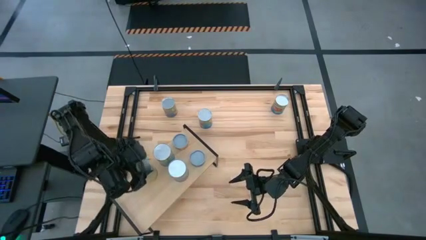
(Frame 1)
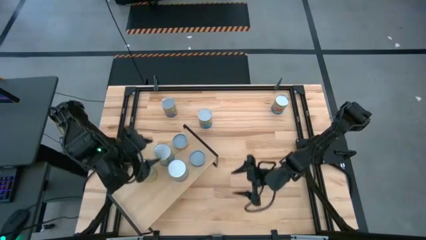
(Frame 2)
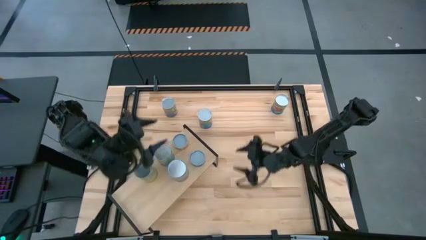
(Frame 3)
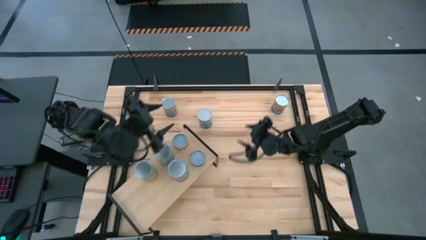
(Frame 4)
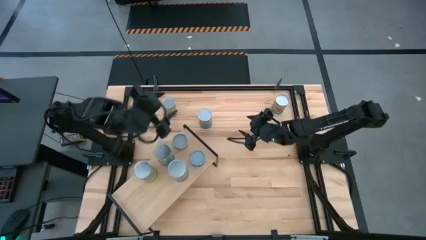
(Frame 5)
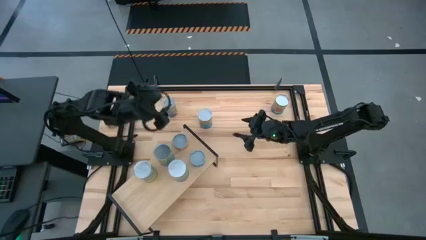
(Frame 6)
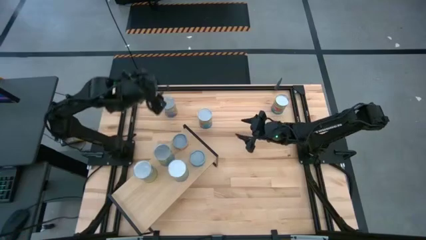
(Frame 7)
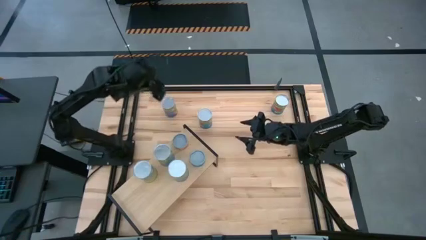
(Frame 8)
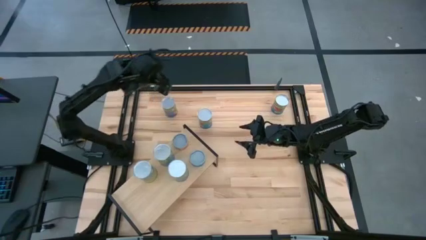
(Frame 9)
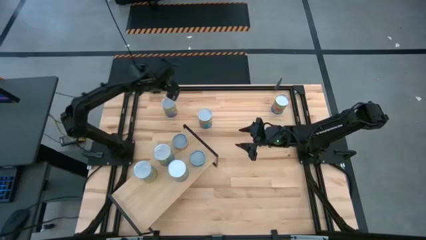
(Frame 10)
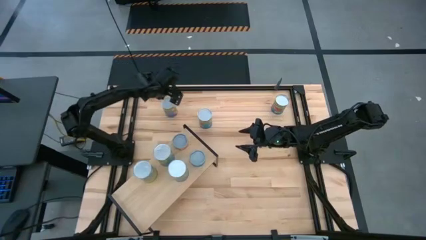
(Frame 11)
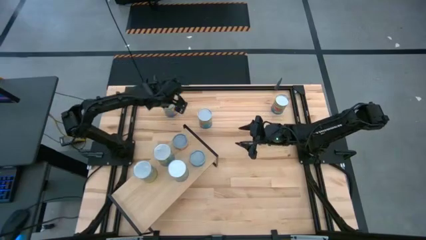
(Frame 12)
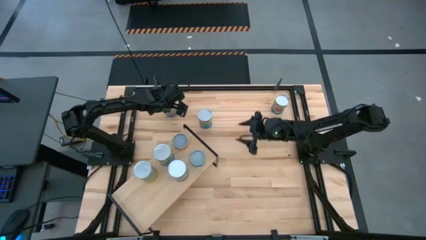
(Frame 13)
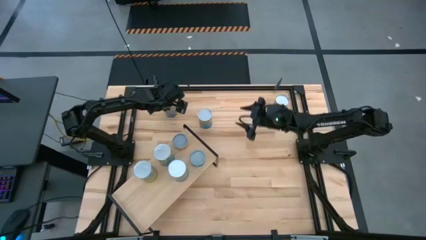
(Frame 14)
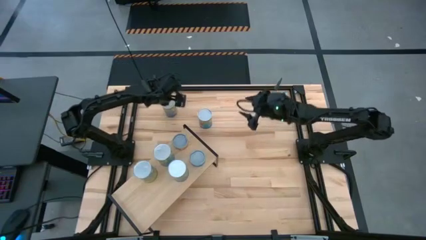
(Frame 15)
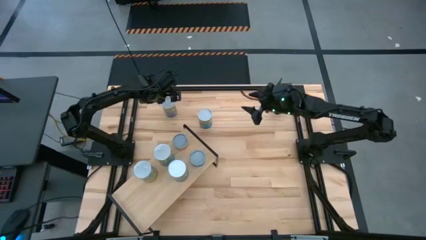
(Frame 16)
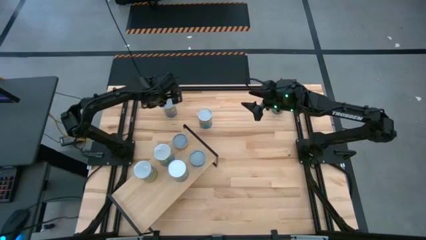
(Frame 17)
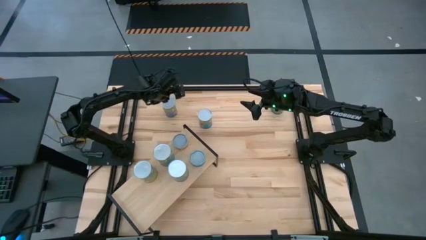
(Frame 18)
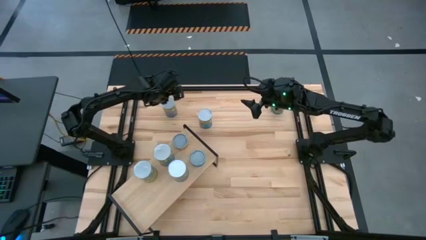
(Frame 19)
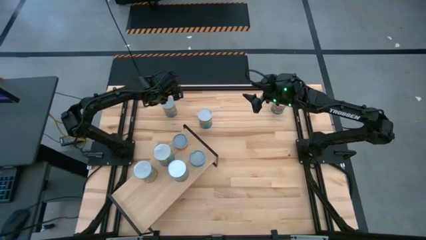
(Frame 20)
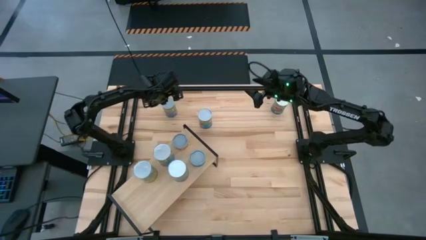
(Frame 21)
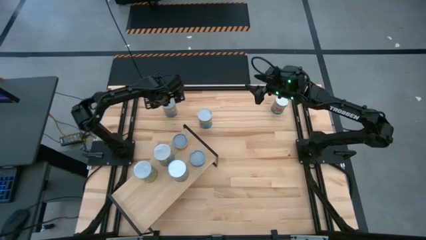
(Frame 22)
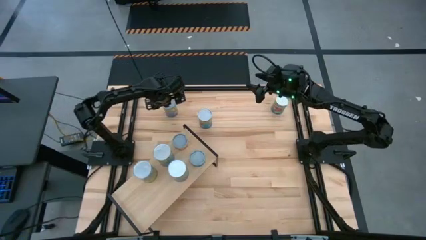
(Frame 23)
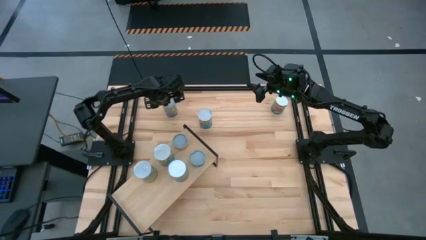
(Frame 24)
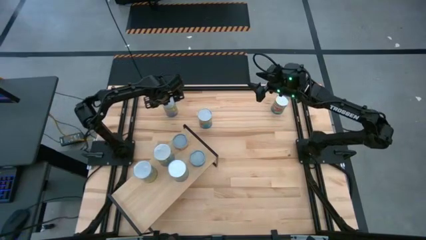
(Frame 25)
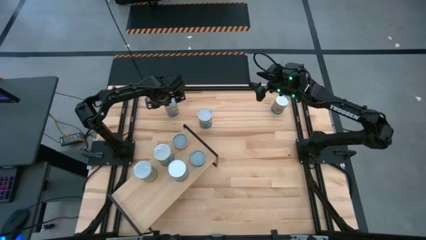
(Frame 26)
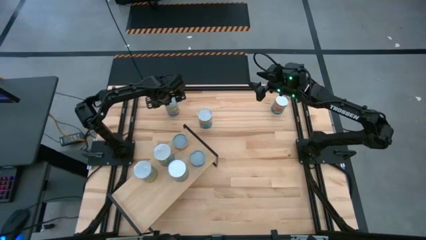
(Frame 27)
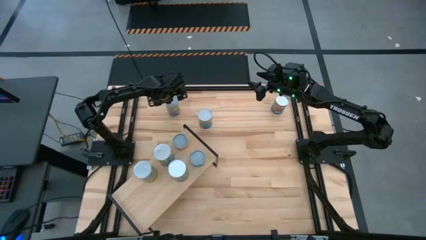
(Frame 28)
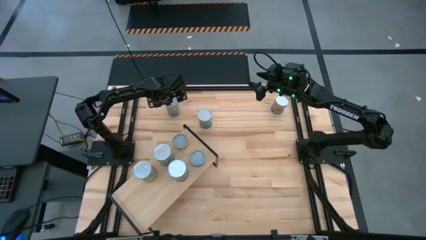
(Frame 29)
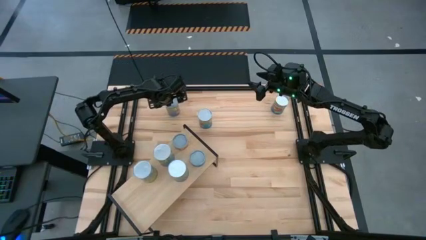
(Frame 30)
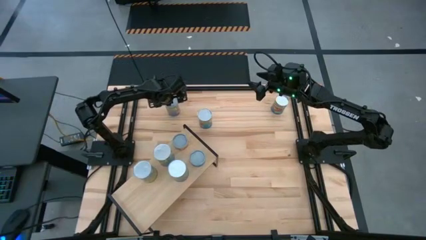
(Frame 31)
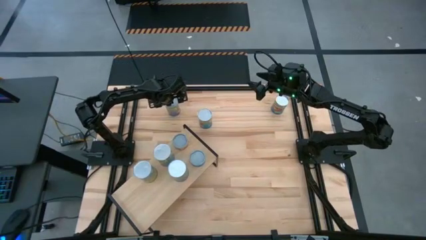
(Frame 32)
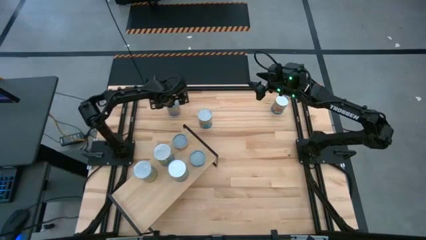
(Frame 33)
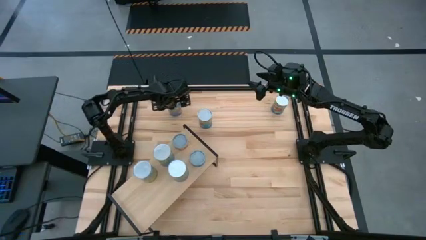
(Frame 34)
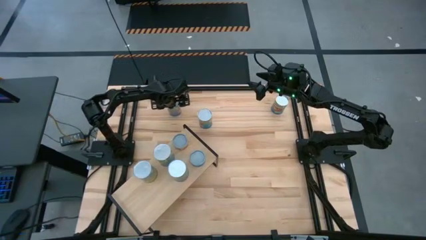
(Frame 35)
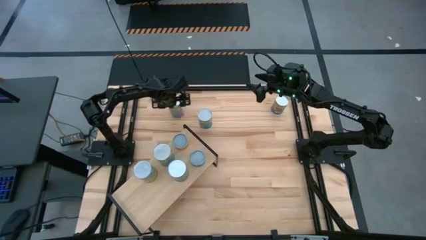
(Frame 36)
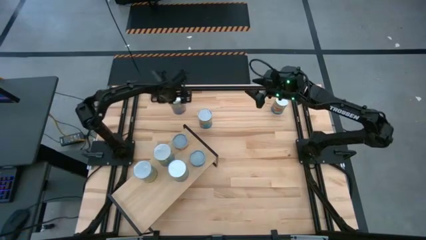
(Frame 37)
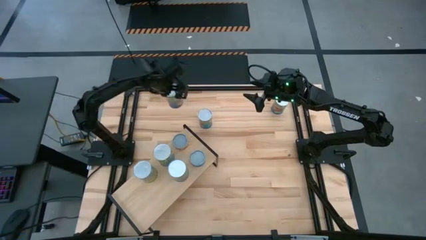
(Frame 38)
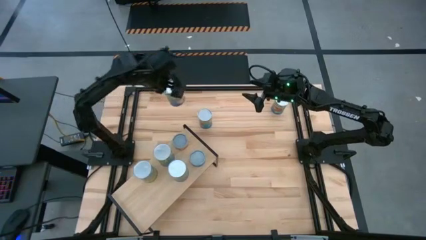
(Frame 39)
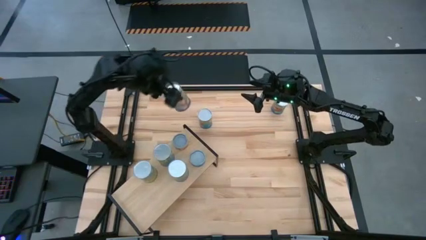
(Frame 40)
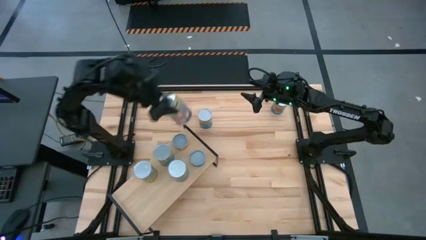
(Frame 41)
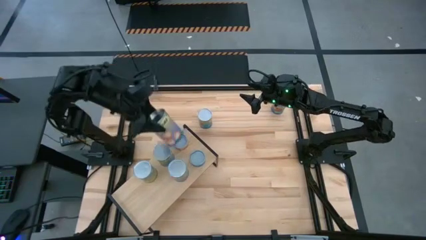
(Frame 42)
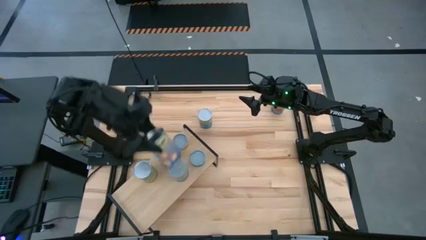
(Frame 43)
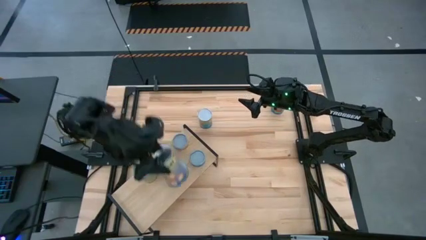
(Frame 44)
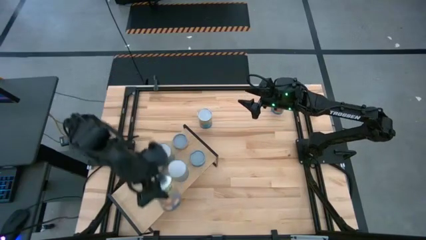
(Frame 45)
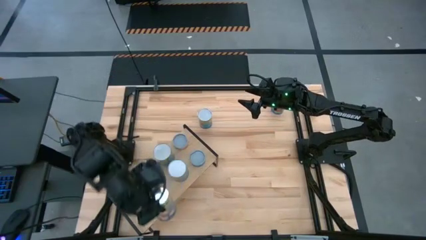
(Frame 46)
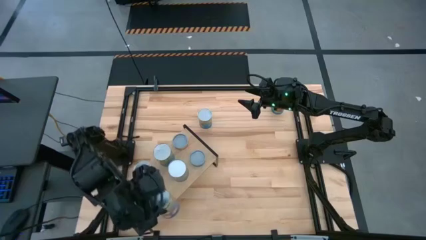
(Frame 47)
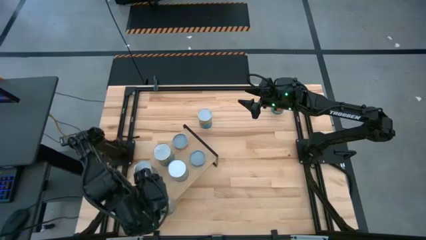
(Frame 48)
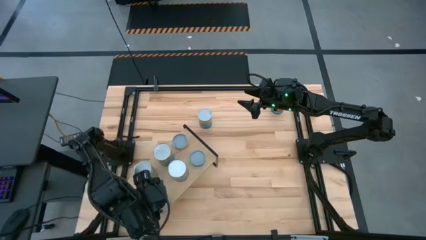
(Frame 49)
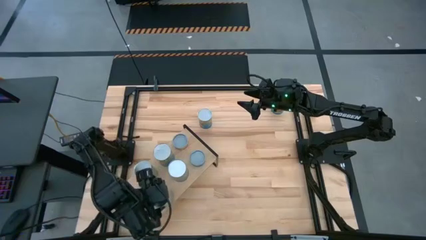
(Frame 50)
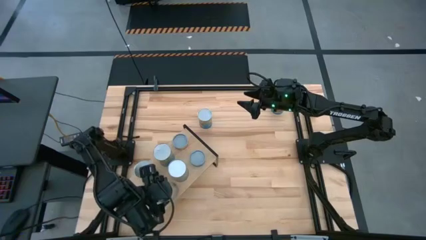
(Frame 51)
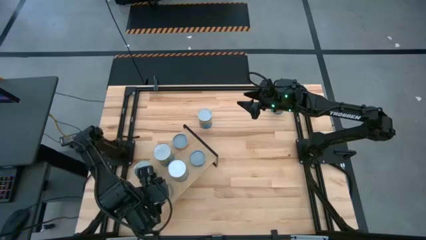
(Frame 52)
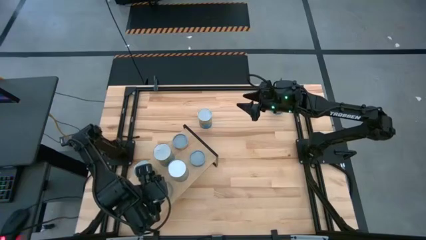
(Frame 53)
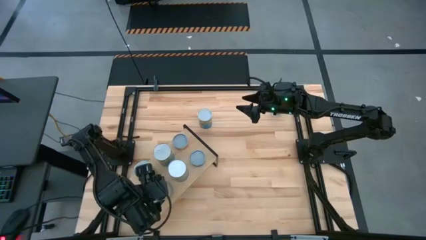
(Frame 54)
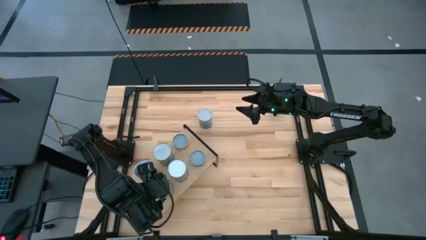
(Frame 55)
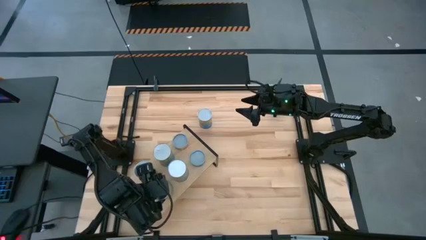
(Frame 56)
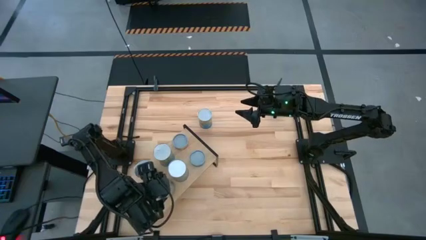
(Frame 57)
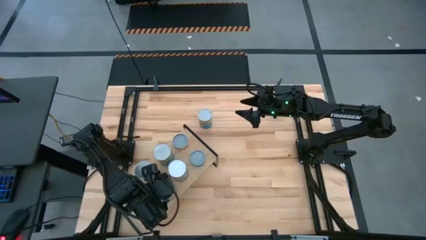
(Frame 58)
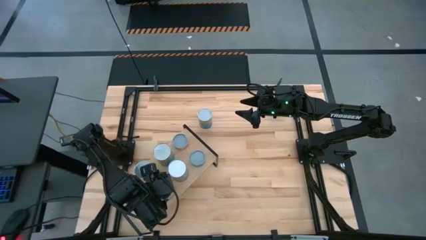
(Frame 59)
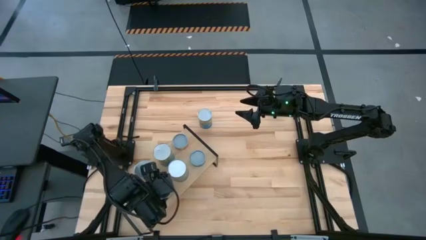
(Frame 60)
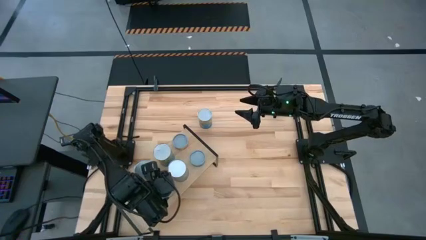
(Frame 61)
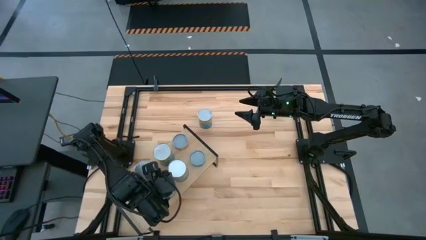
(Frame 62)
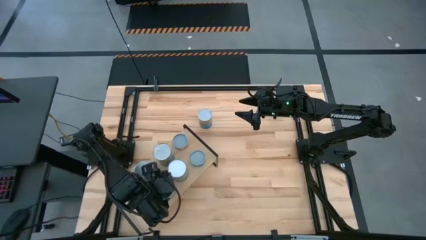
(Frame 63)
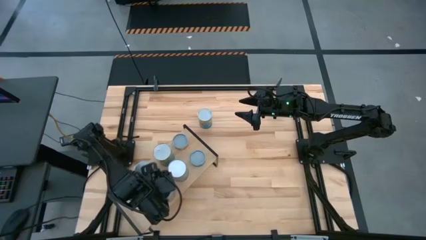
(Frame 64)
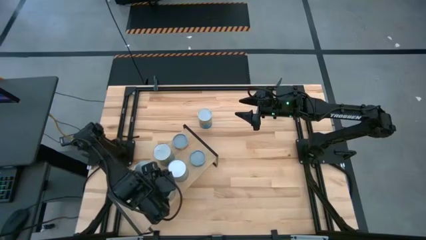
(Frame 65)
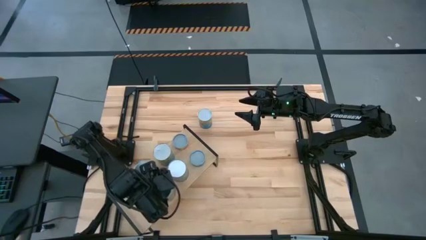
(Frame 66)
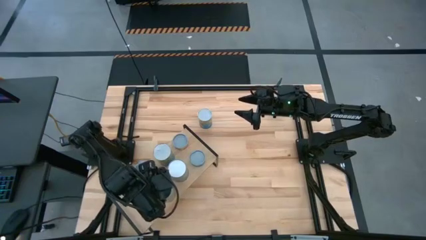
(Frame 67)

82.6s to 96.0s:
Task: Pick and place cans onto a shelf
Put the canned peaches on the shelf

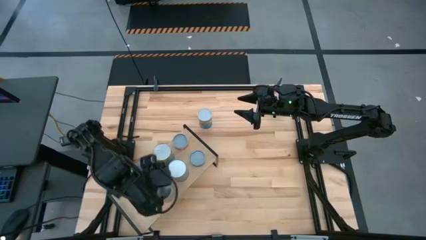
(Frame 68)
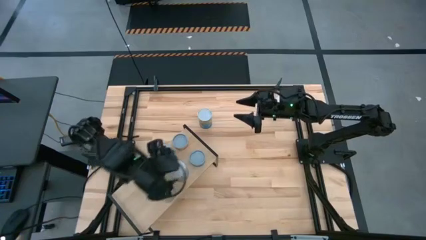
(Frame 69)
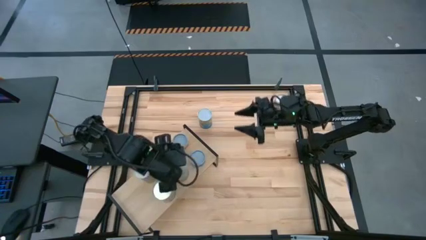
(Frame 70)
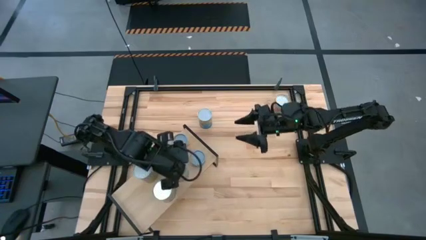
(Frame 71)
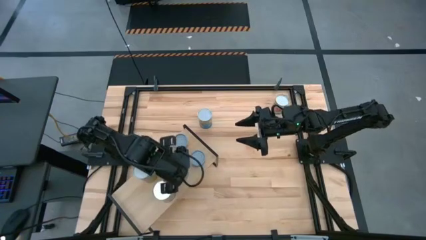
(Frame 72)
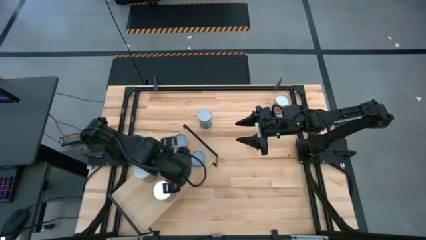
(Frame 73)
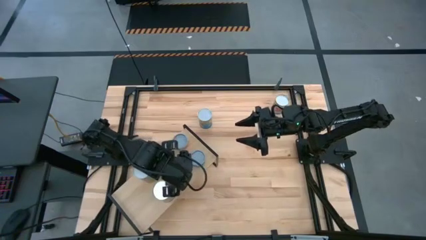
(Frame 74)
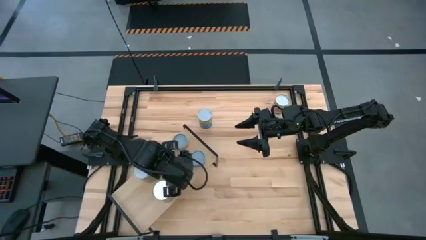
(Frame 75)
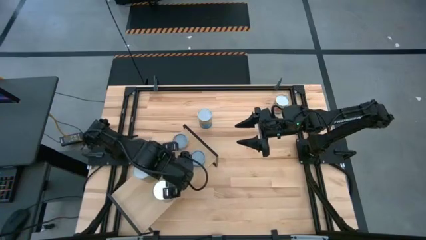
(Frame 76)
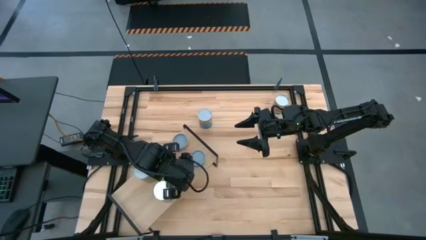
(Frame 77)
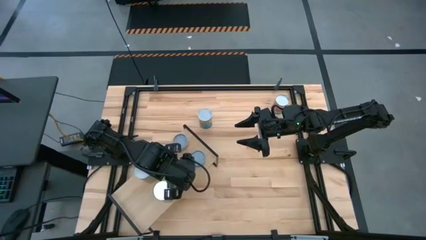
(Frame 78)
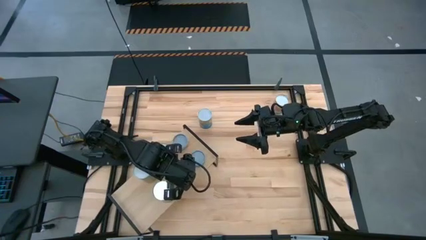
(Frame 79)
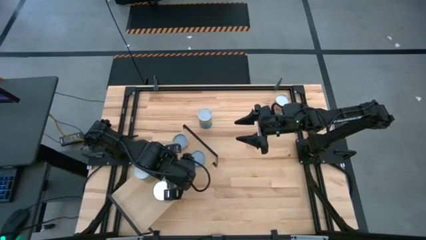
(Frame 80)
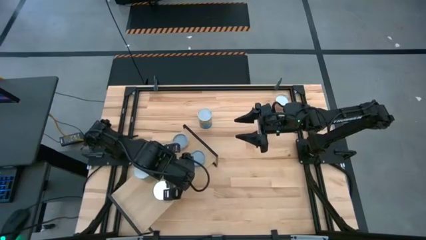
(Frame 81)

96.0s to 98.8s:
Adjust the canned cherries on the shelf
